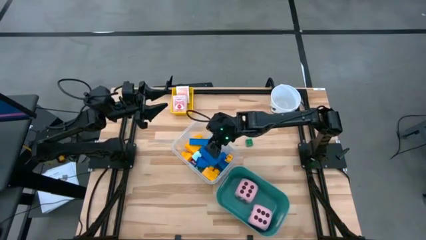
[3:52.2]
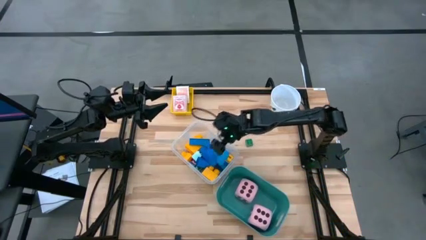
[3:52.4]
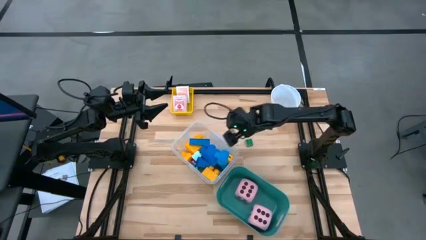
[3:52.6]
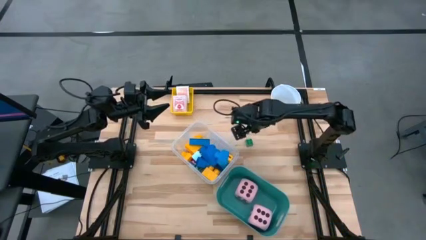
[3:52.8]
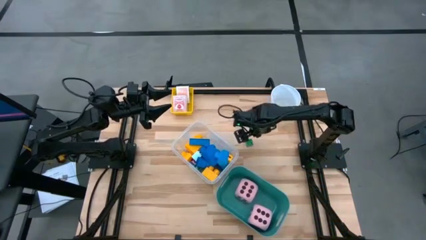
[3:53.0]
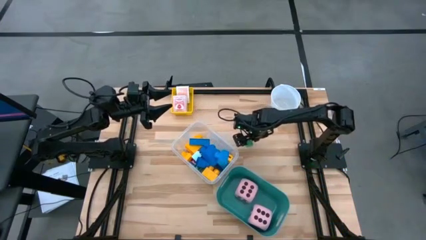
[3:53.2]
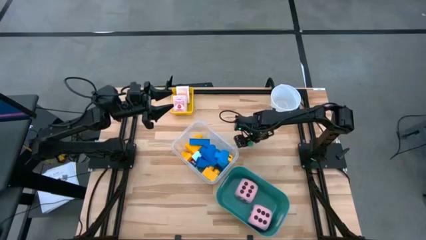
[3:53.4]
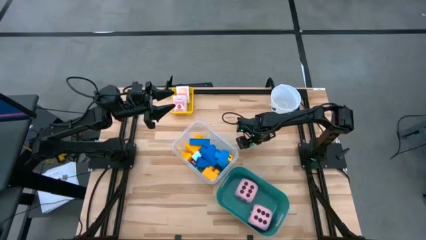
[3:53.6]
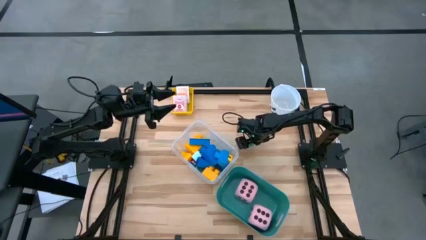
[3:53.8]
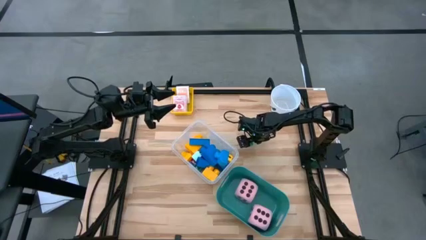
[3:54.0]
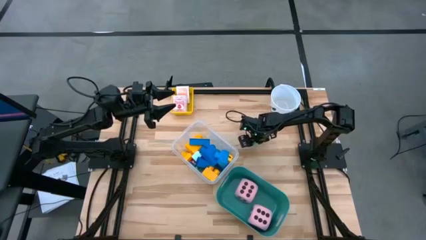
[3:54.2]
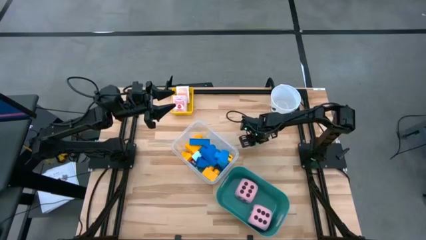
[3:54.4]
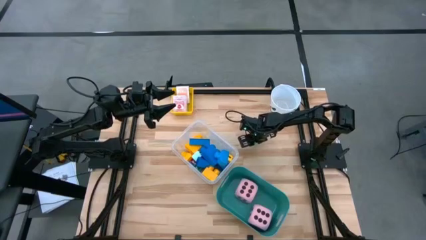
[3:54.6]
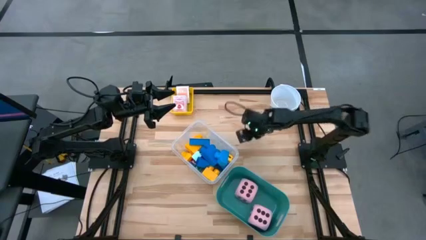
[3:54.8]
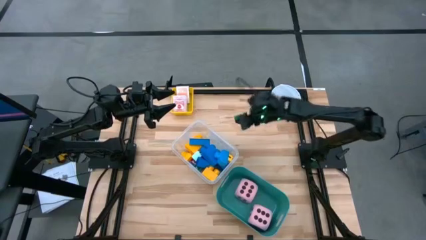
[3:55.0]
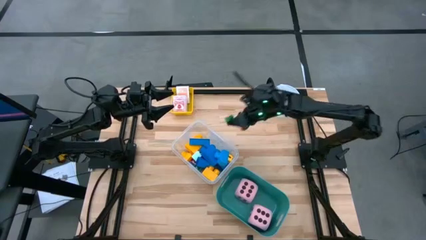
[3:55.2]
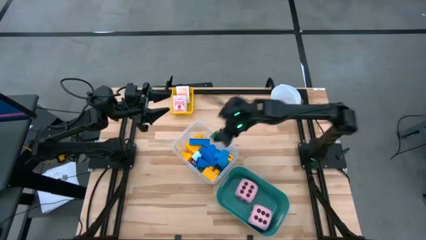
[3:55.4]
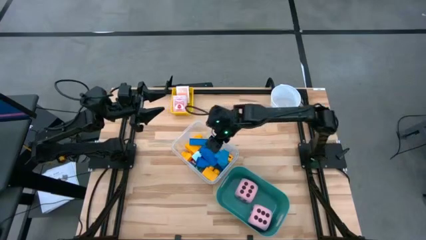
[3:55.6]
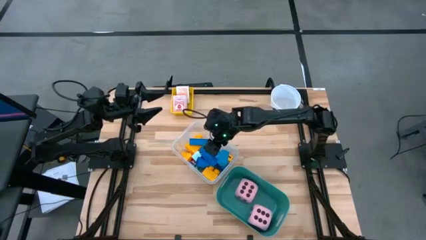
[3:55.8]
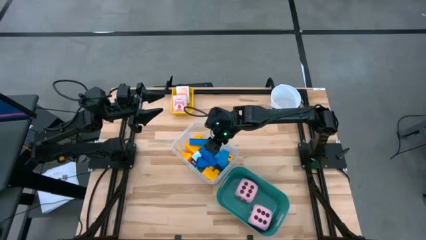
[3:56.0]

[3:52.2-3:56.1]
Task: Pick & Place Toys
Put the green game piece into the transparent bin

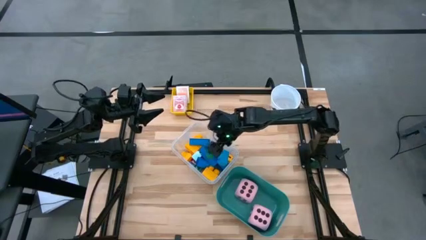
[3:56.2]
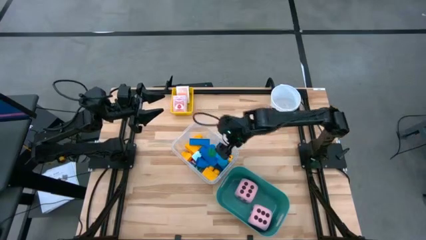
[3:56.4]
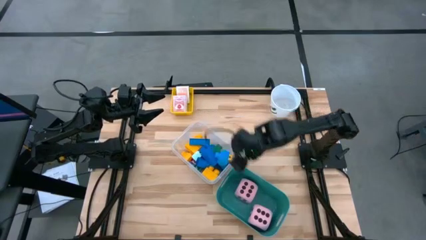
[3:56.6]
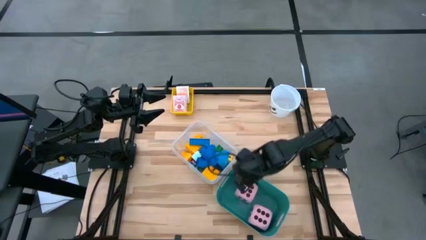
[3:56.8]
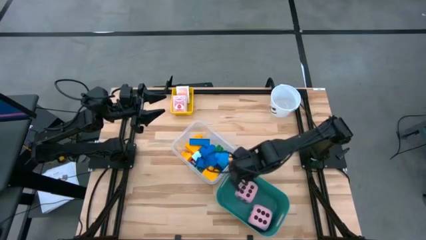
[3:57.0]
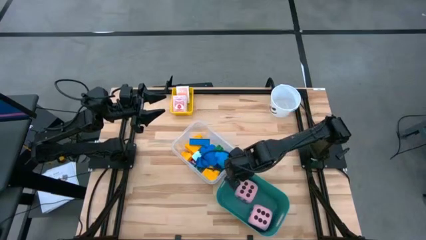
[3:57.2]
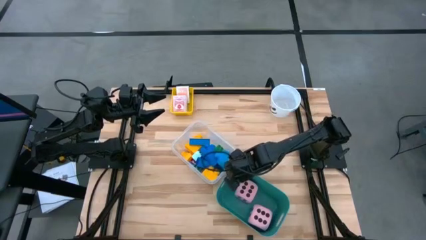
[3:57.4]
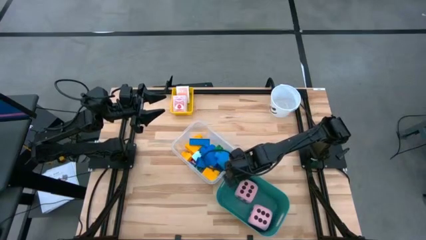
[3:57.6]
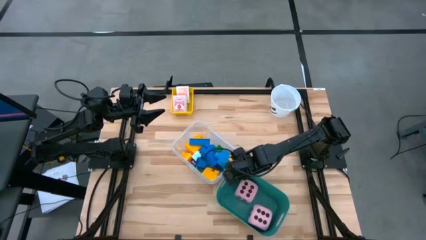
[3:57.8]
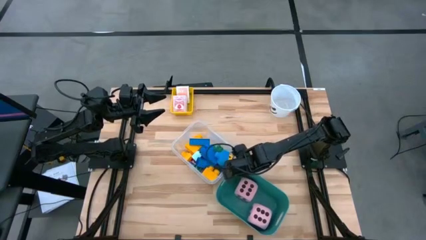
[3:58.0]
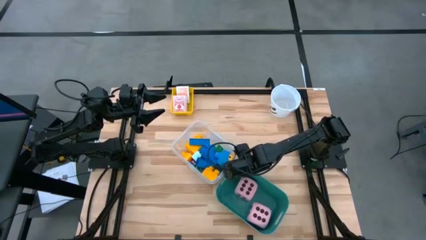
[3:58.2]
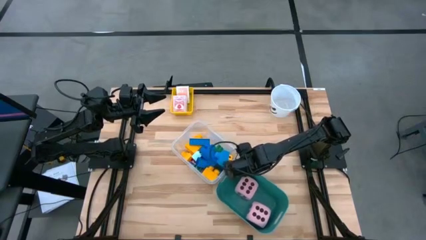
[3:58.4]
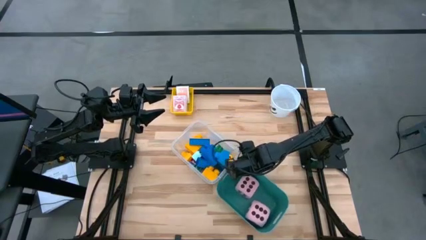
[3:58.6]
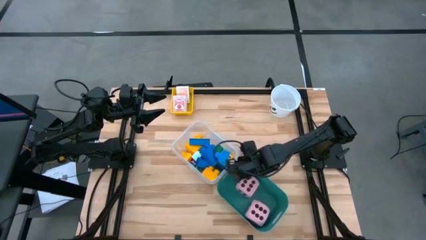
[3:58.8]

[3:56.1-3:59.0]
Adjust the green bin on the table

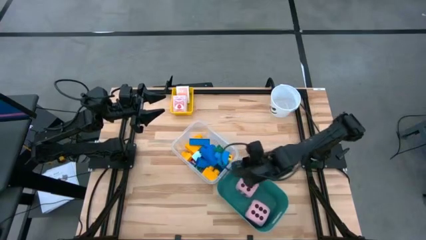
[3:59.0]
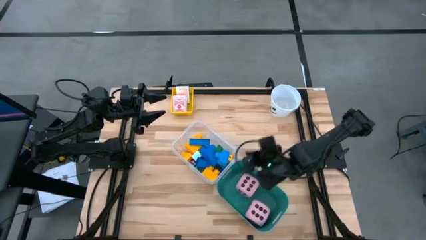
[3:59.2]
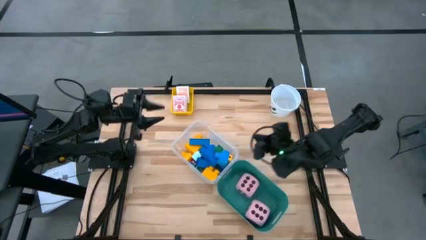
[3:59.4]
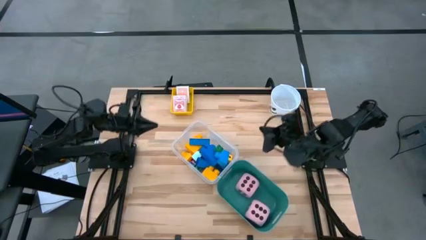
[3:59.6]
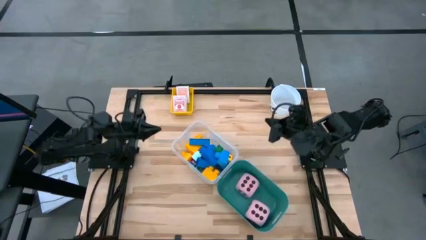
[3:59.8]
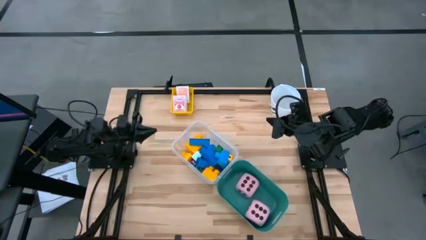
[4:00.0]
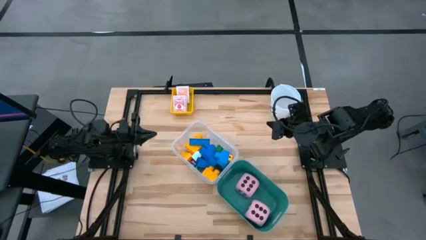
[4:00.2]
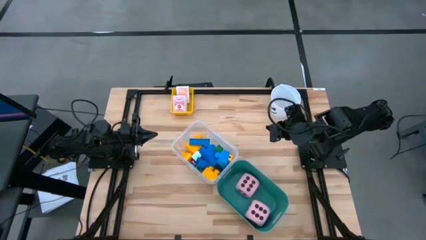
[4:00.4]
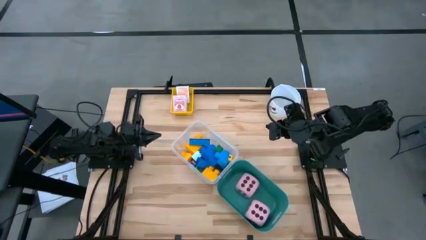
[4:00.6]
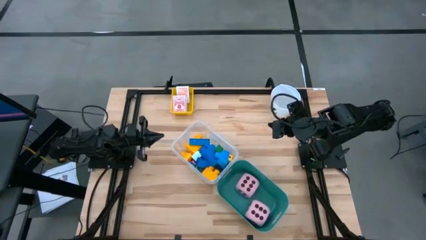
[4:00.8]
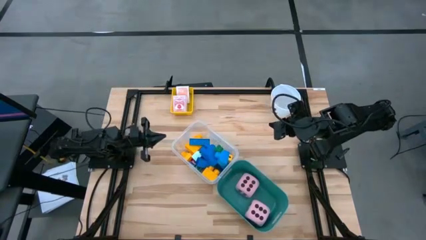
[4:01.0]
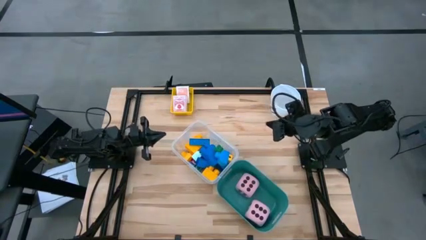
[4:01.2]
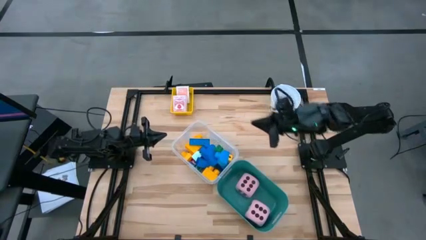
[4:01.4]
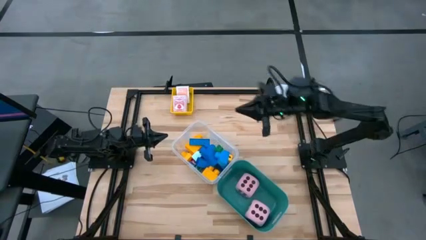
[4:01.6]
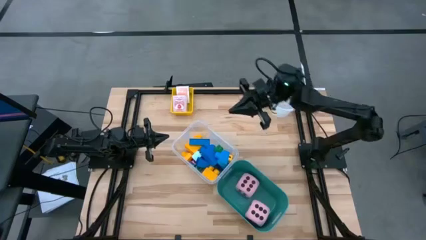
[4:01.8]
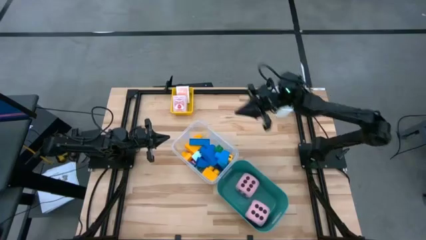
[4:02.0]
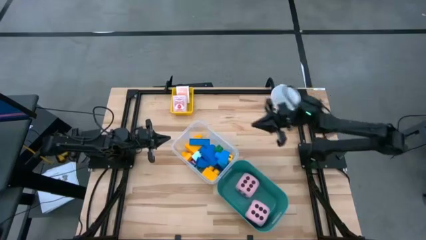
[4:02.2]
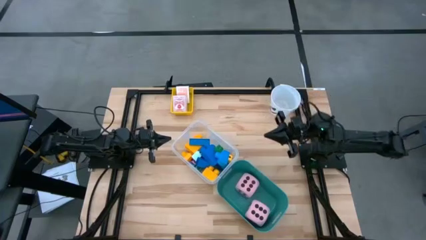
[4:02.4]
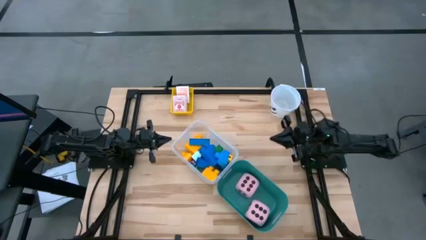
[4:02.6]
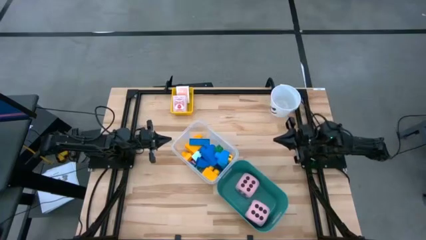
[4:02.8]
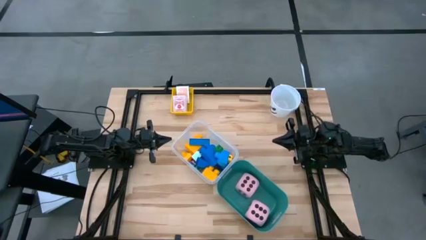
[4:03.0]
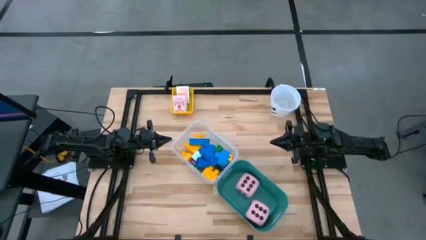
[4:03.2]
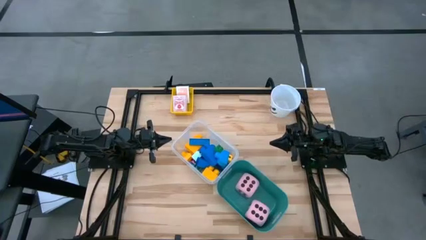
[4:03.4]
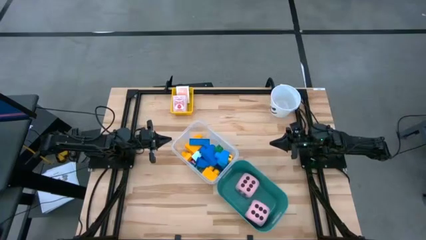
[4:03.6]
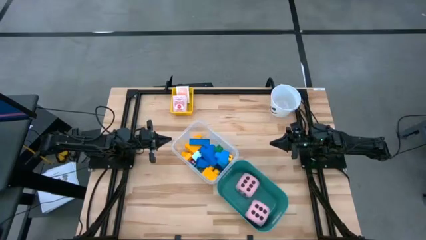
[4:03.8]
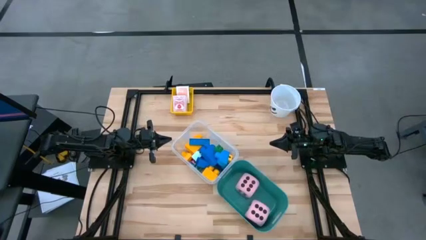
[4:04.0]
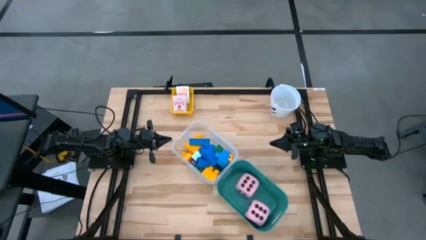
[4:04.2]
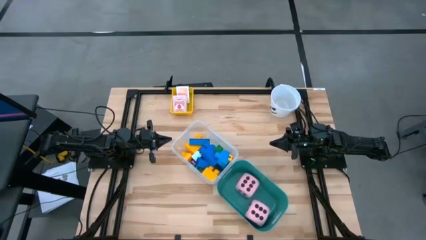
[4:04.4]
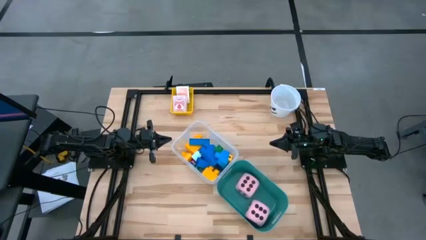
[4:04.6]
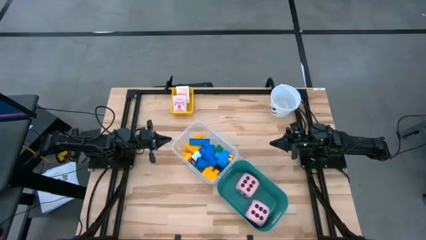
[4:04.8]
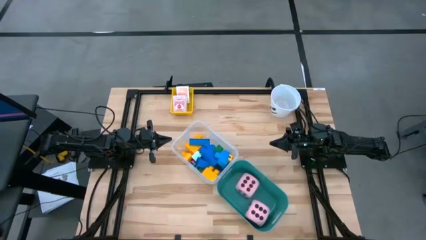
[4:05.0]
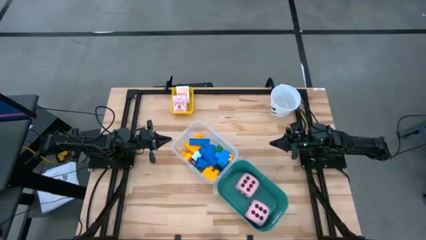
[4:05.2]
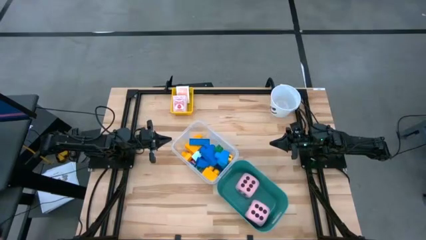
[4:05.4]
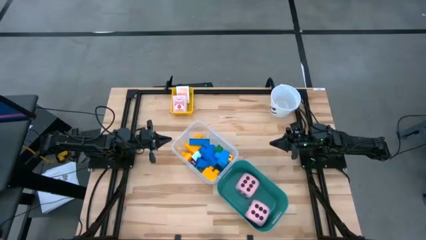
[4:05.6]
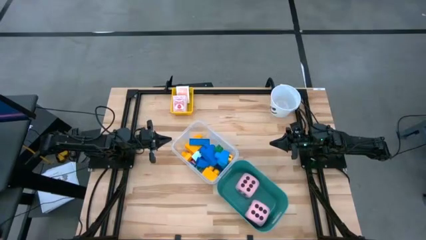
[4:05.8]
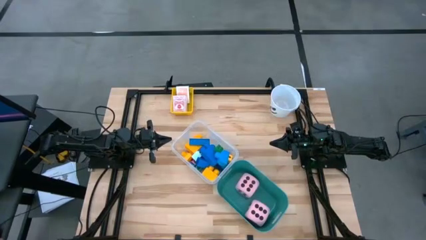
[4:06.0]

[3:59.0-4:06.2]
Return to Home Position
